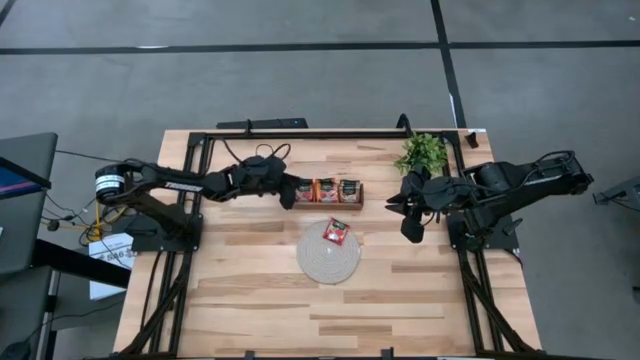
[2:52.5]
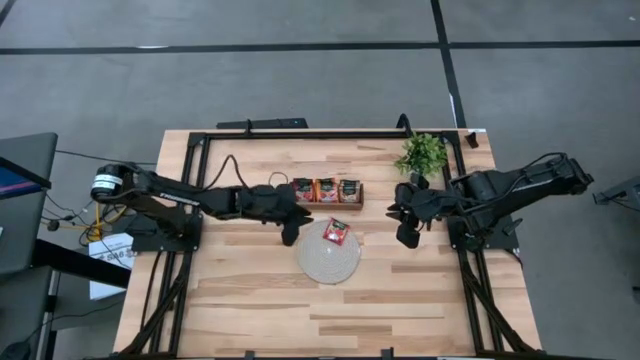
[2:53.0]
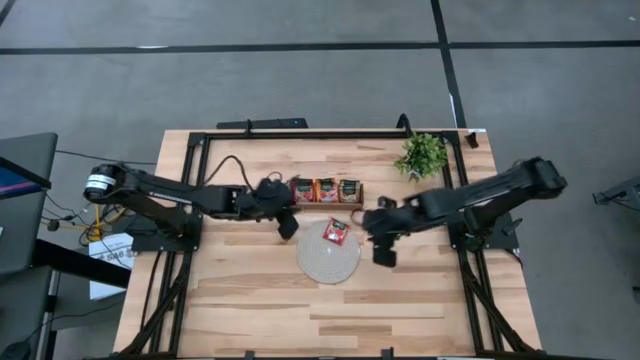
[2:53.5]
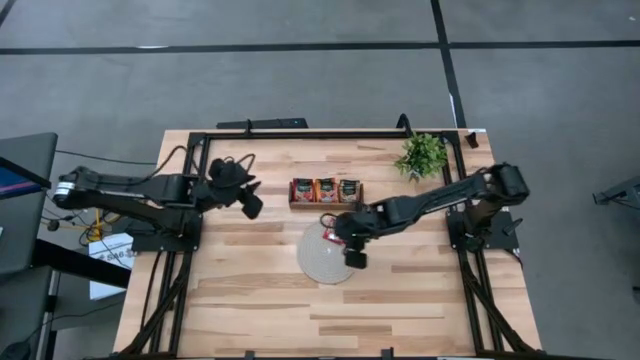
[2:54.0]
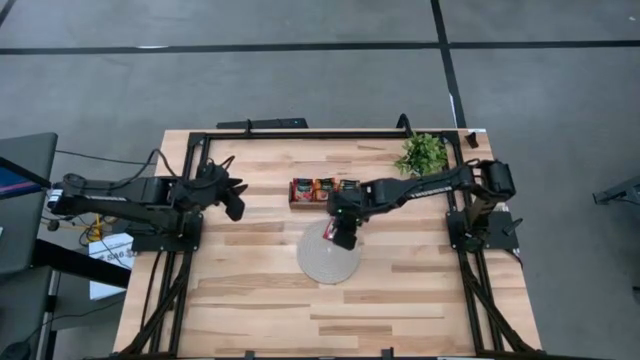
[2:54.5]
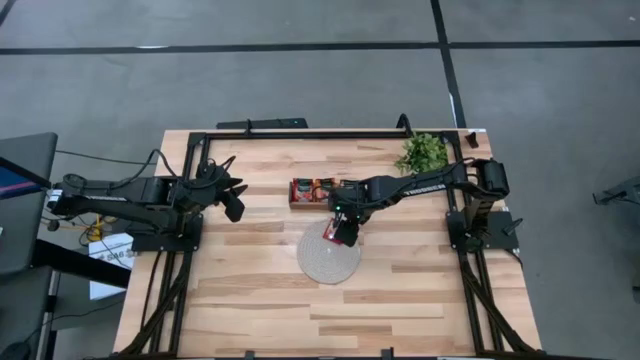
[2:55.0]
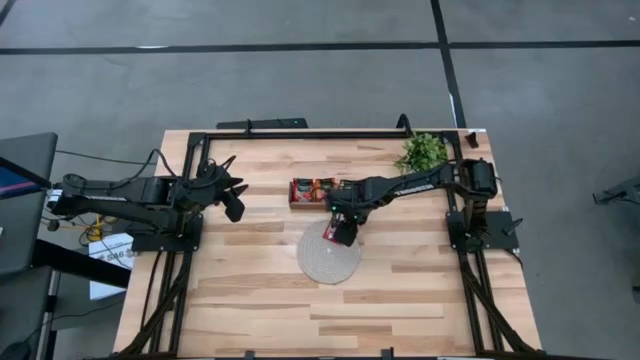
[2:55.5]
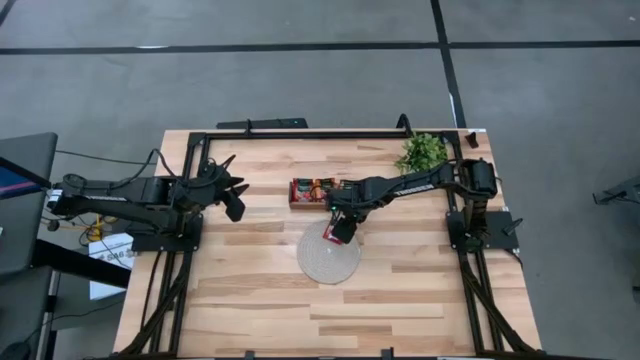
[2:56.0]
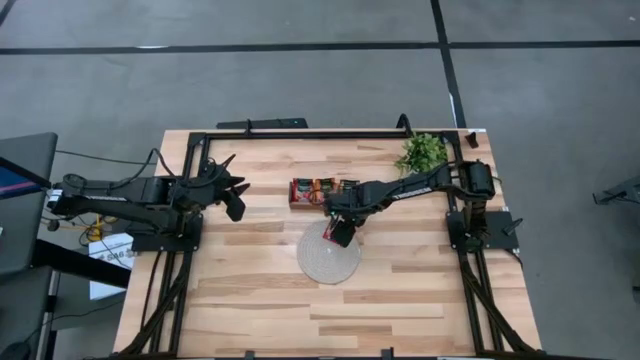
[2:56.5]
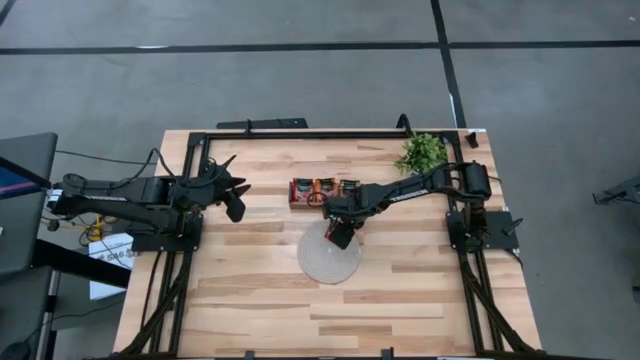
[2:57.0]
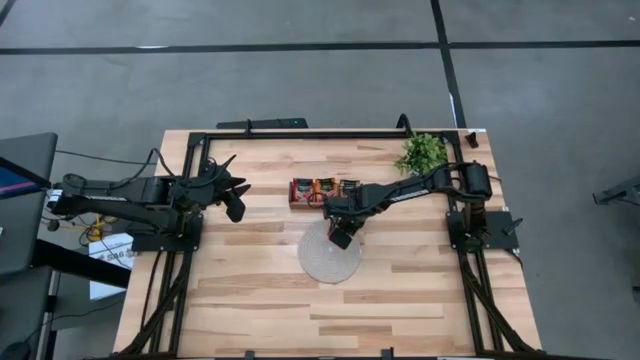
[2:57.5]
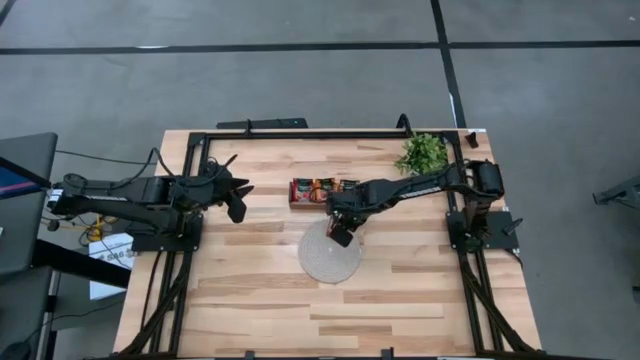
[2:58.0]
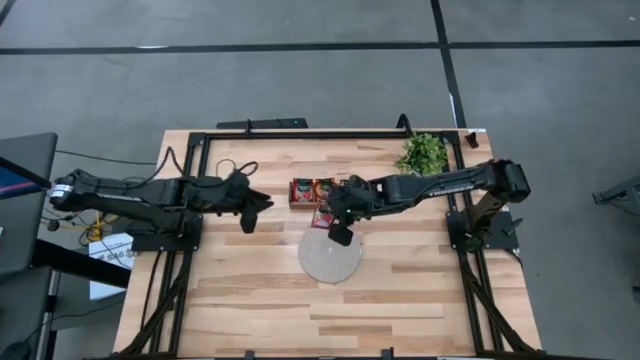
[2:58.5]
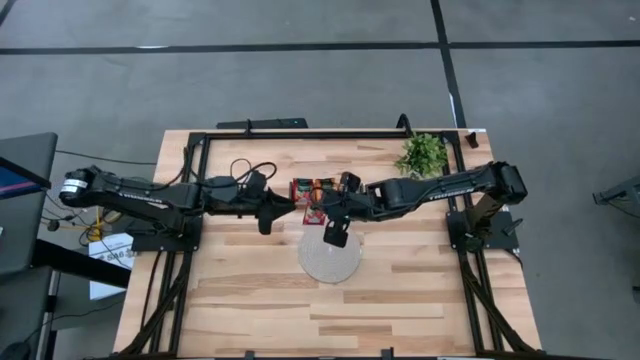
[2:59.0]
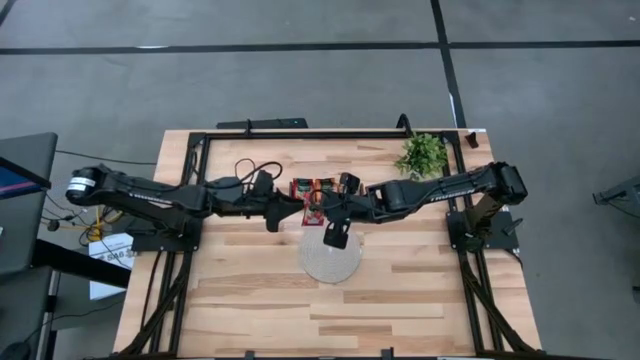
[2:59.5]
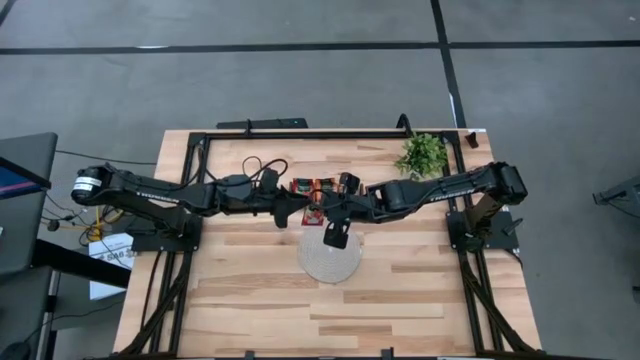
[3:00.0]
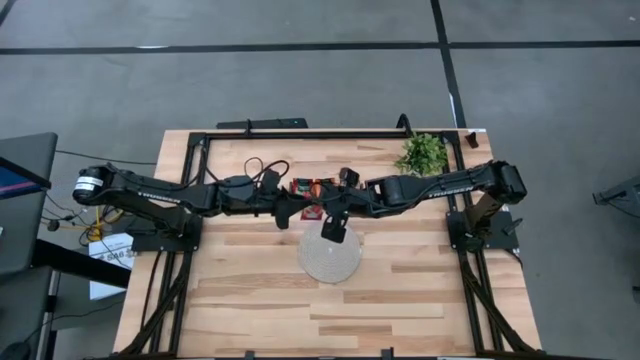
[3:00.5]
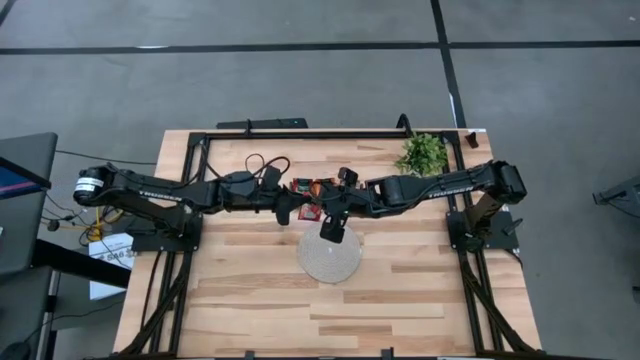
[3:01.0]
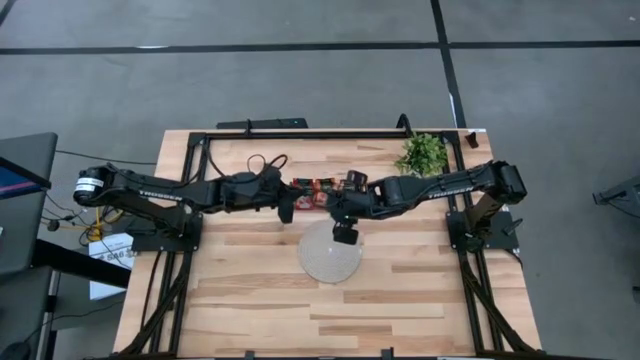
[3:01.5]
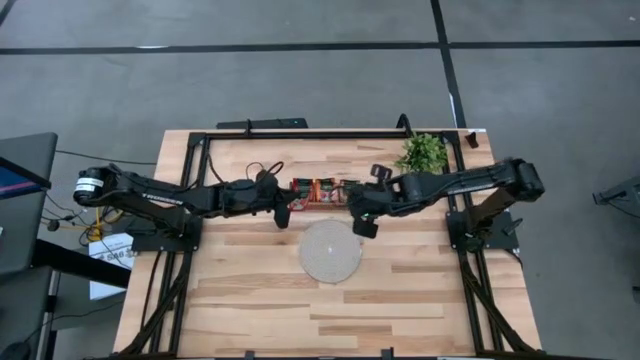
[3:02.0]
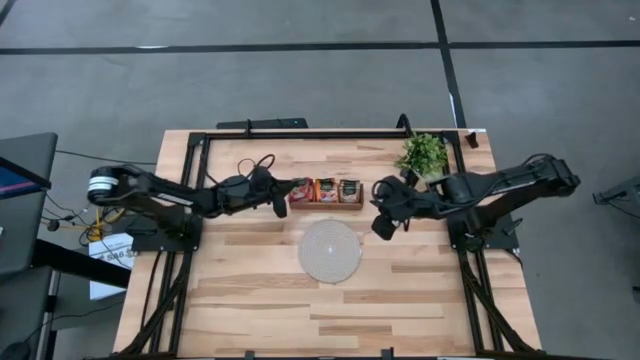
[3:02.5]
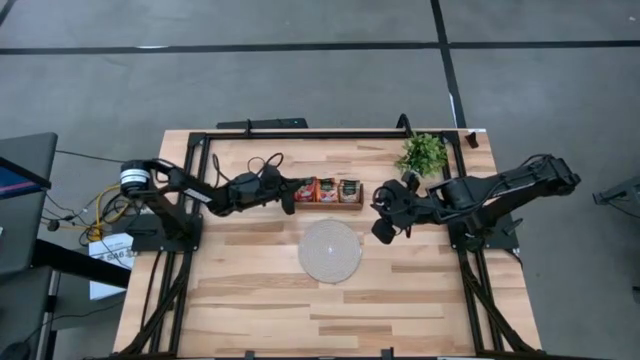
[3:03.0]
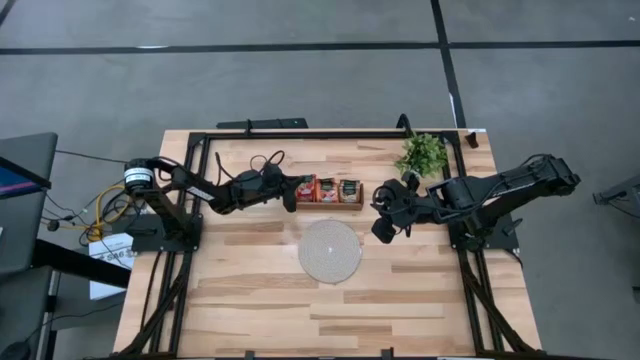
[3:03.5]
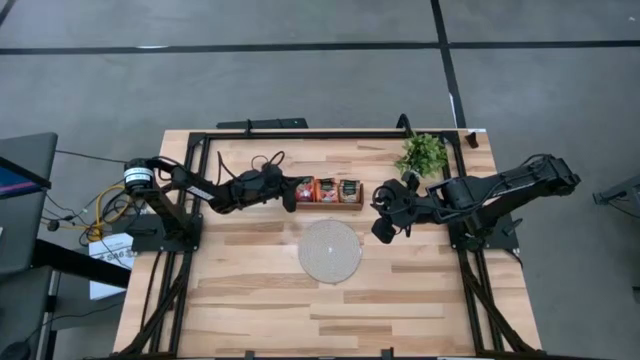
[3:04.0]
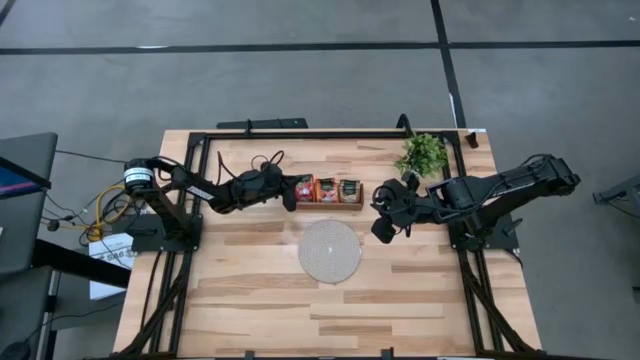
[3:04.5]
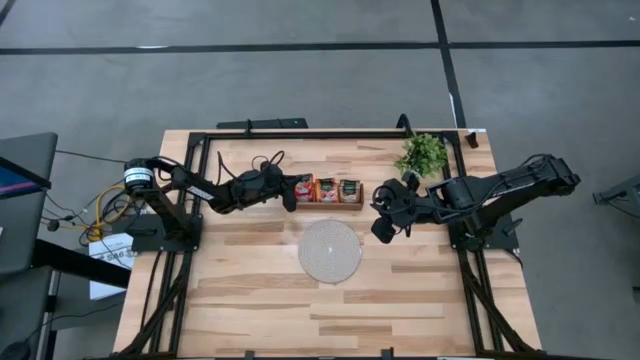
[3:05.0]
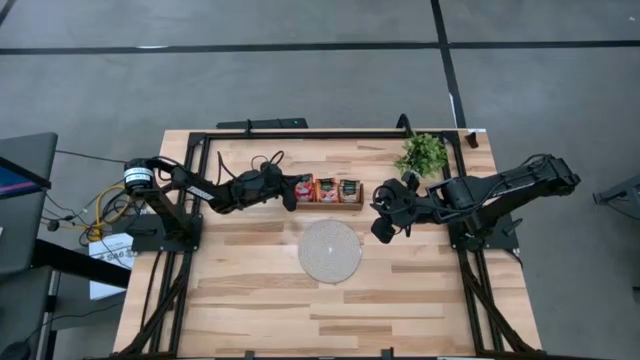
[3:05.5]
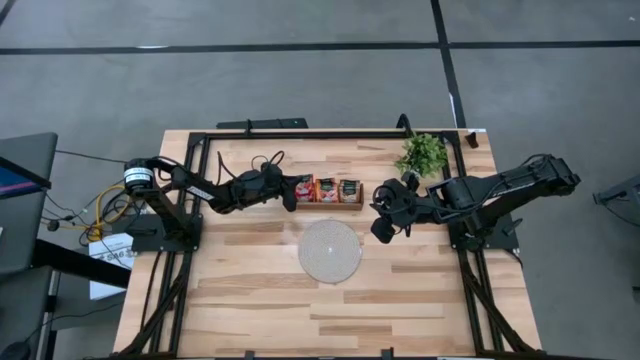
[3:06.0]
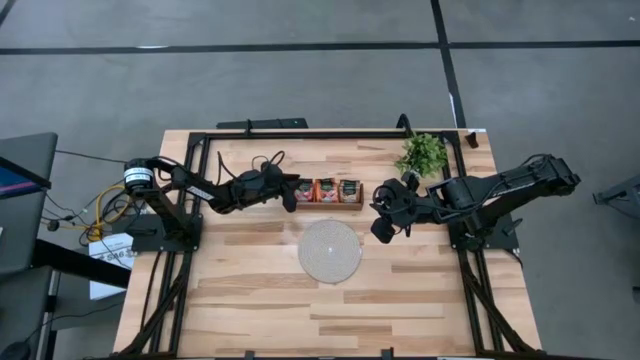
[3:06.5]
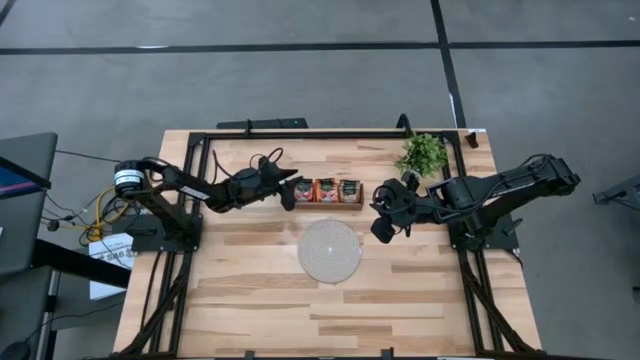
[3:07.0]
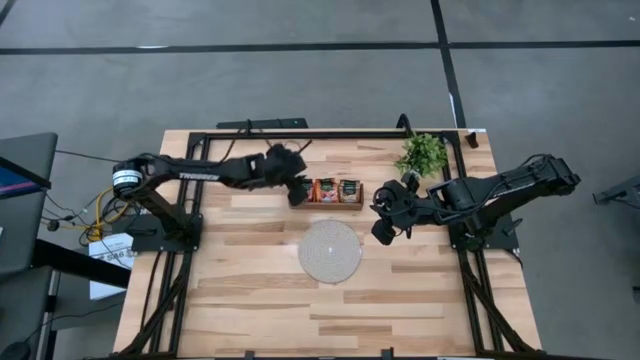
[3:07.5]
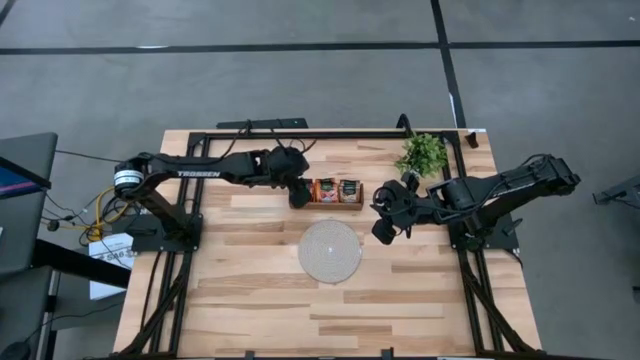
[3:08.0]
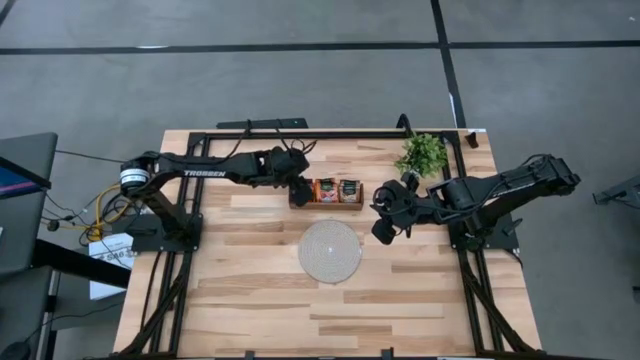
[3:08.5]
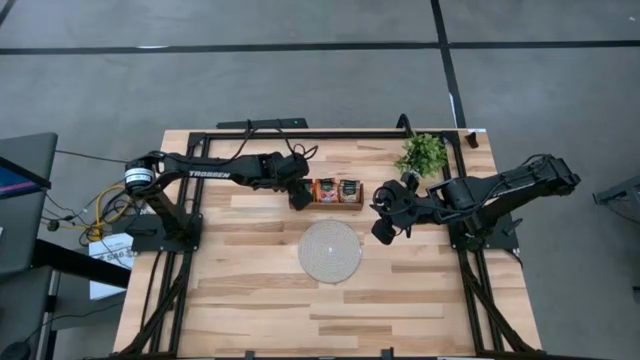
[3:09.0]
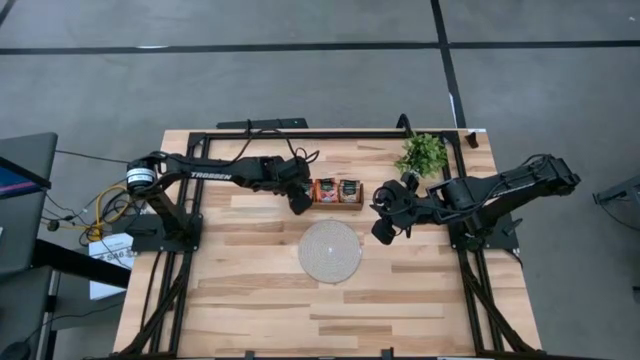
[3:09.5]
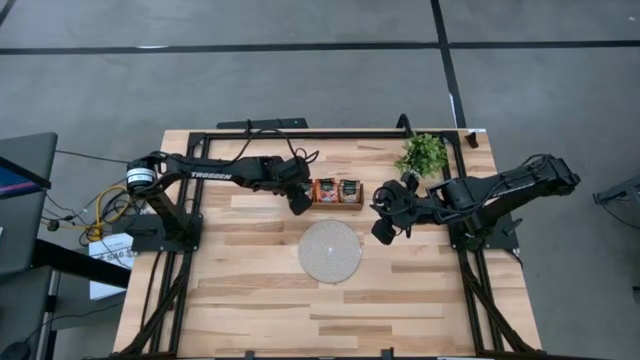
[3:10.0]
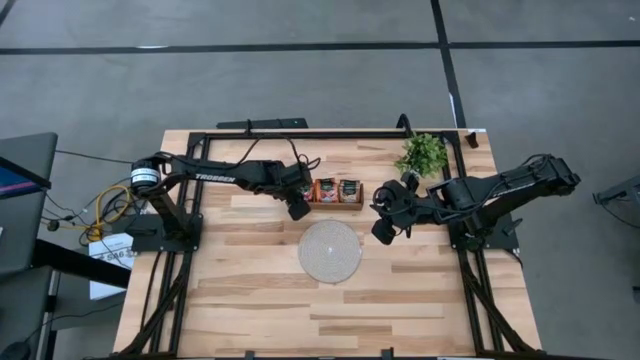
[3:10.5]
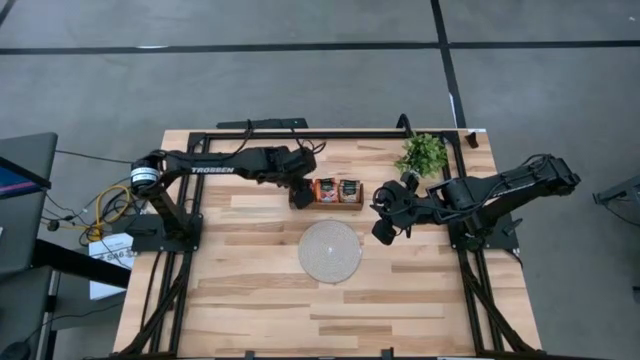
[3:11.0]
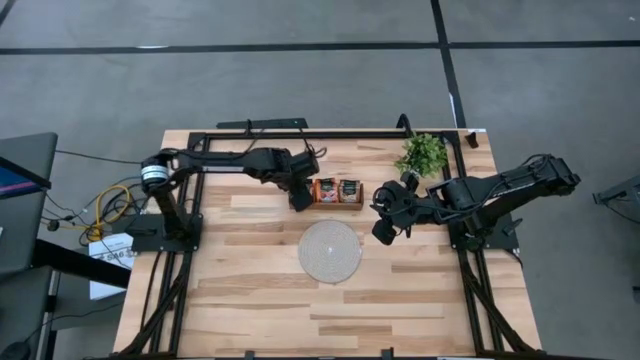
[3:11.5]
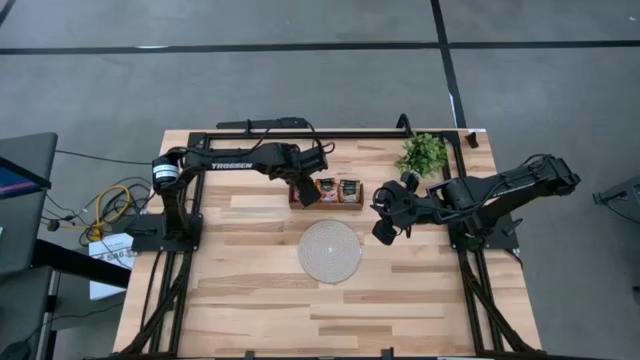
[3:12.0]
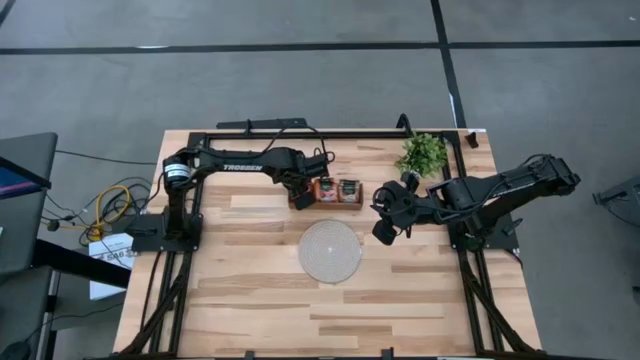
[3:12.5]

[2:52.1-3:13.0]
Task: Pick & Place Tea
Put the red tea bag into the left section of the wooden organizer
